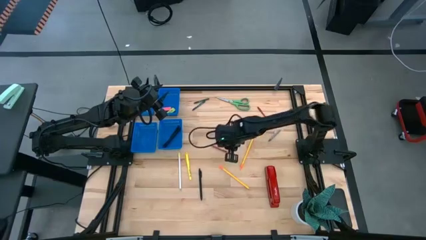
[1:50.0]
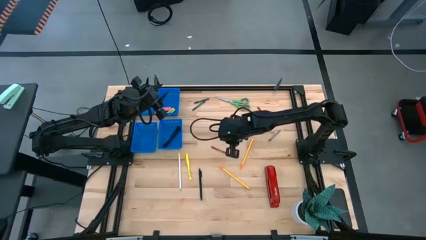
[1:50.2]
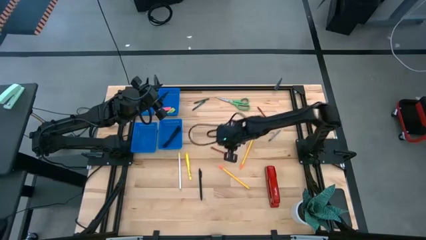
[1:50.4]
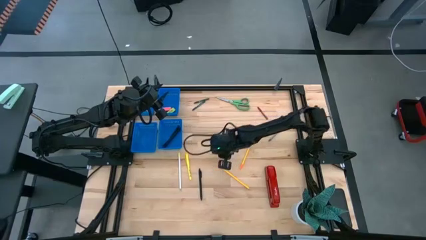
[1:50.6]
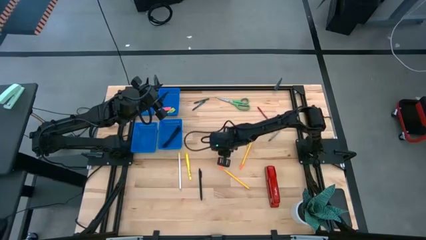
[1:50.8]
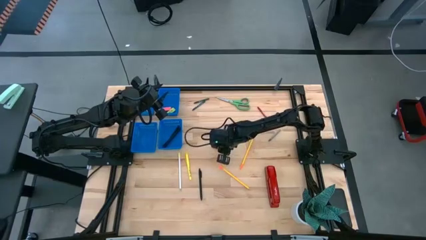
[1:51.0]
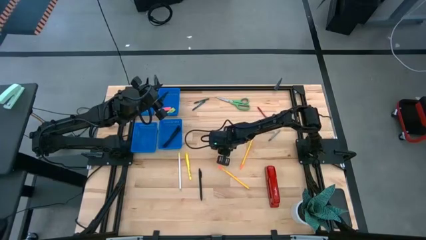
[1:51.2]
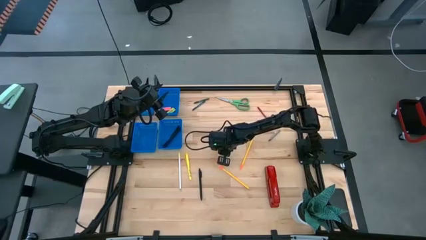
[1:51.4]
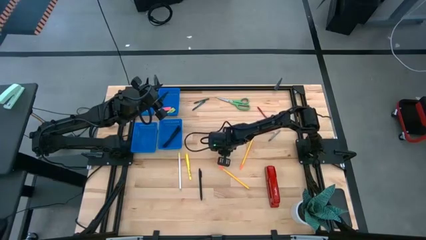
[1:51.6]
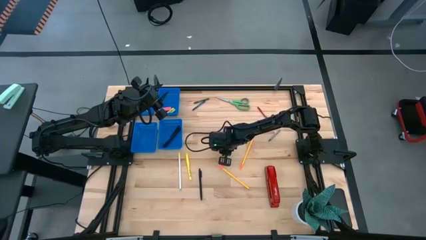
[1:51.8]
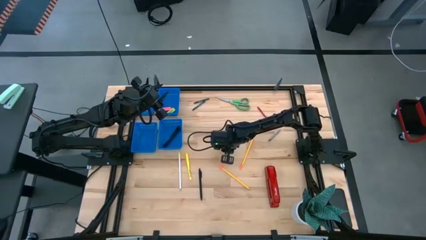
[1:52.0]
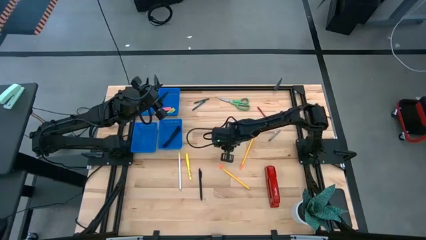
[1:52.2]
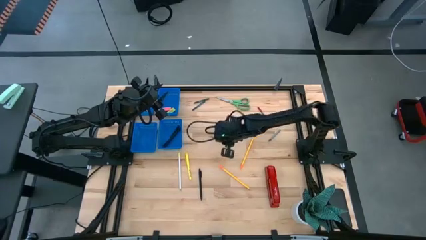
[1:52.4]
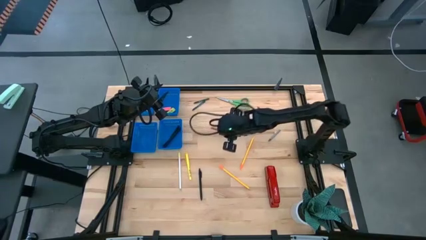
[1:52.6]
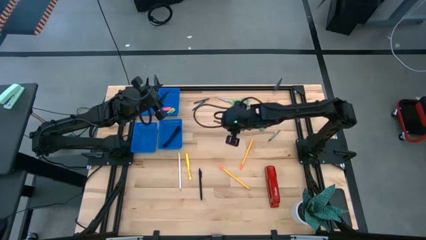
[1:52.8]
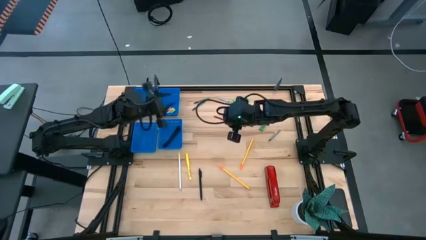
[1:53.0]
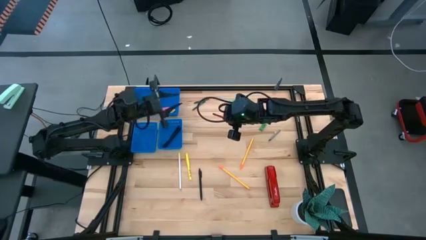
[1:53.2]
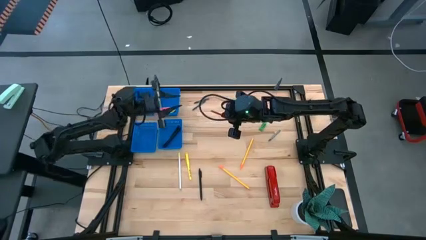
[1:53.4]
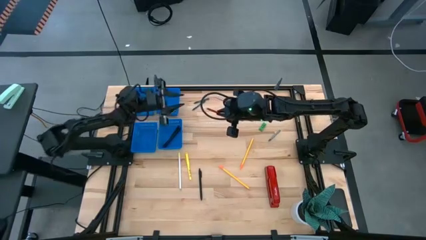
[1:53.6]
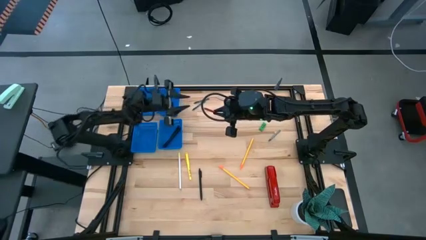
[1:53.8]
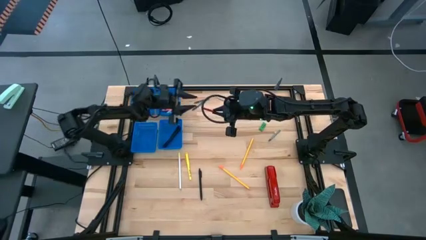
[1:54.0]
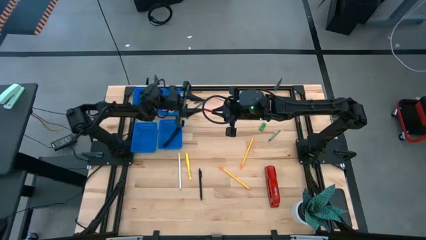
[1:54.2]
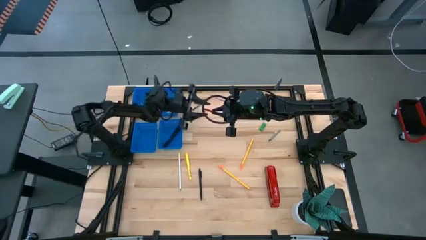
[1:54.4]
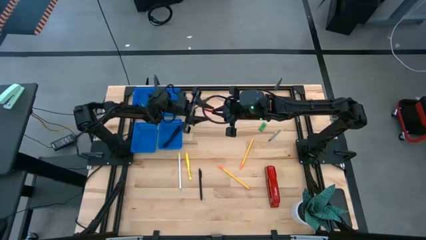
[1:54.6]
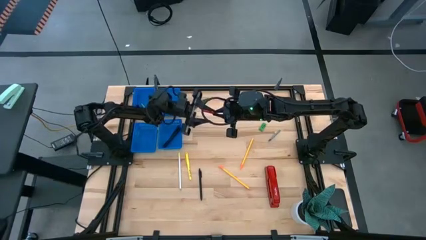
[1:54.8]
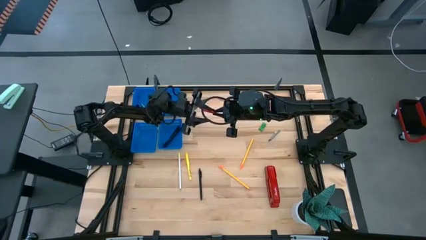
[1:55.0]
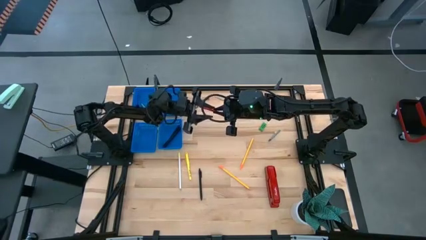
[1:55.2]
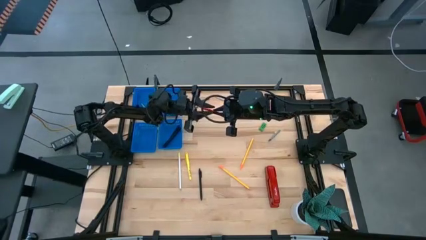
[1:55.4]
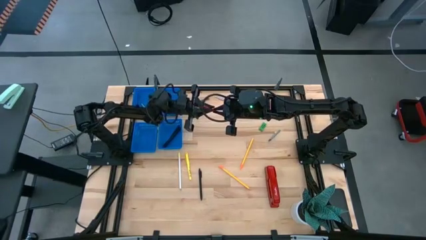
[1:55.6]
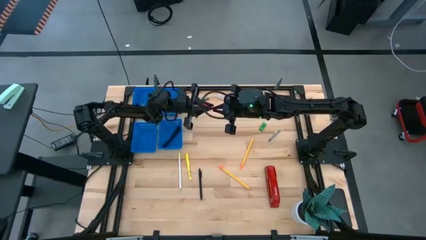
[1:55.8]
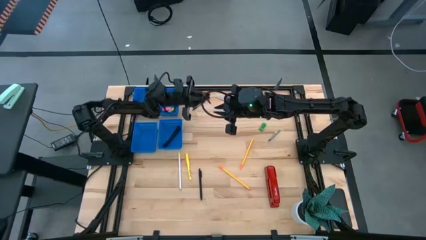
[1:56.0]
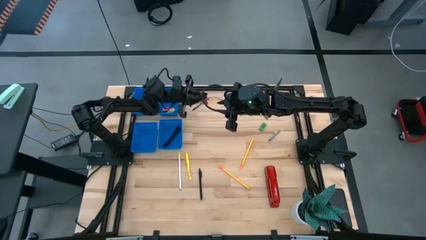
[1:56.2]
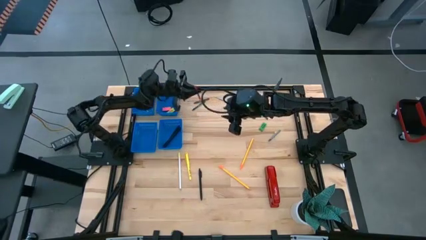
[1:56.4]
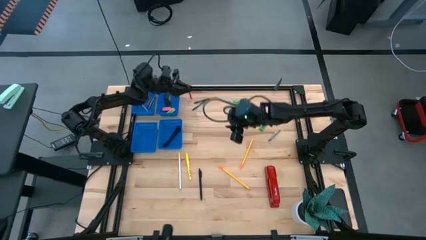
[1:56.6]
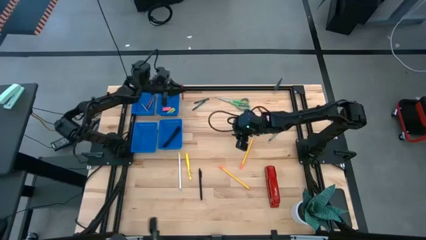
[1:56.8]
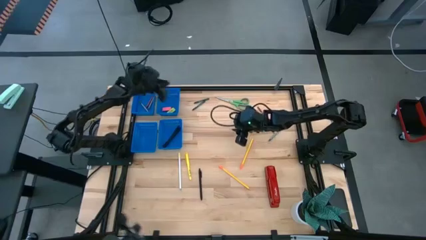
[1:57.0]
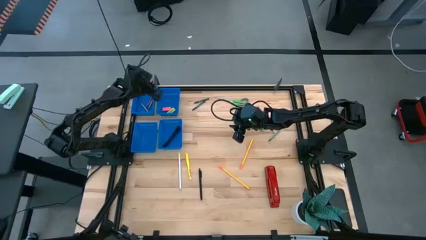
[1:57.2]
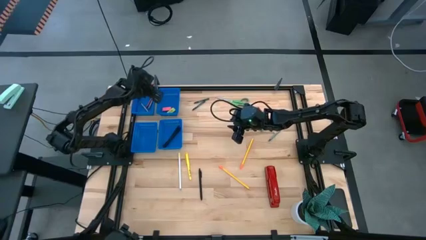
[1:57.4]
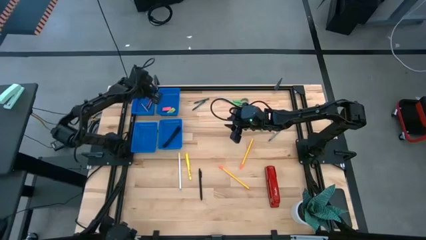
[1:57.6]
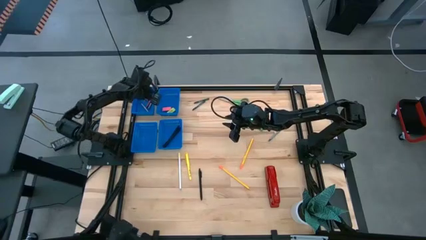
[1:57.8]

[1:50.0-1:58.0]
Task: Sort crayons/erasers/pens/pencils in bins
Put the red crayon into the top left blue bin

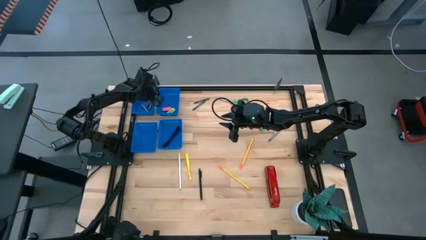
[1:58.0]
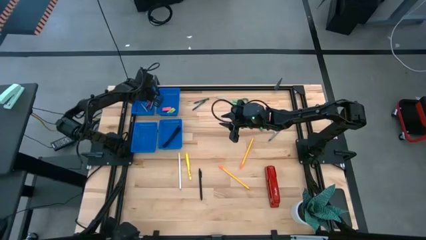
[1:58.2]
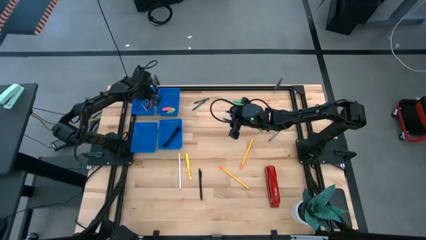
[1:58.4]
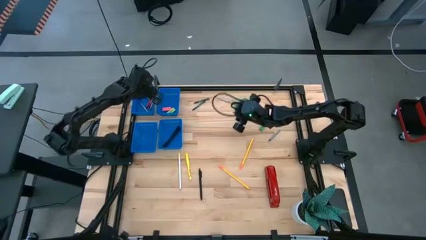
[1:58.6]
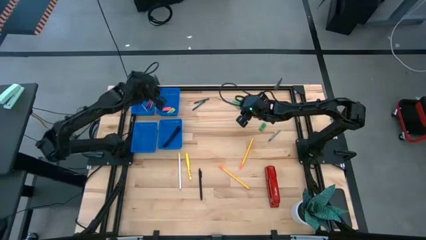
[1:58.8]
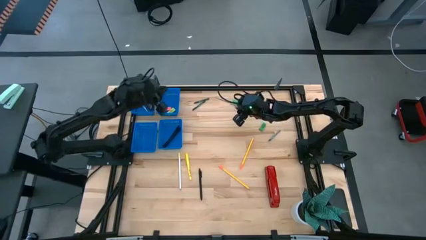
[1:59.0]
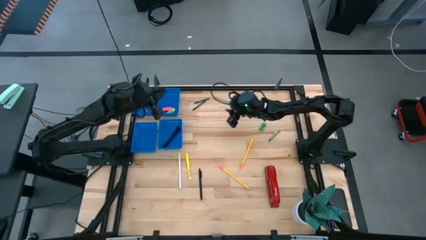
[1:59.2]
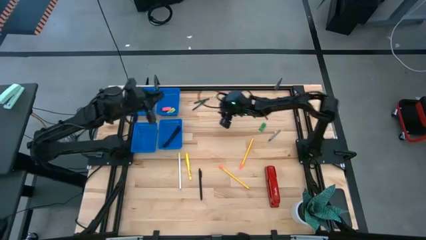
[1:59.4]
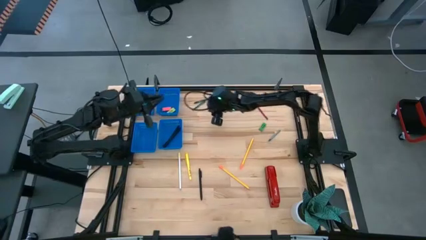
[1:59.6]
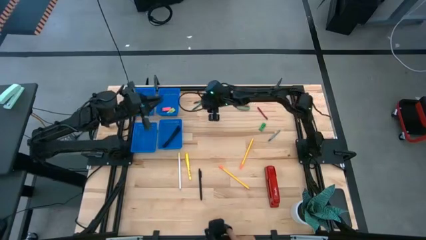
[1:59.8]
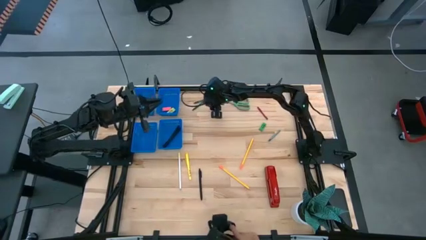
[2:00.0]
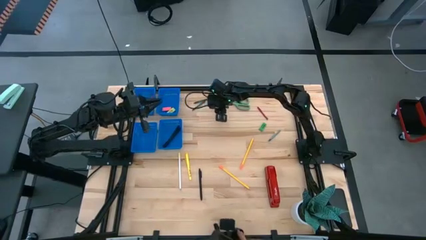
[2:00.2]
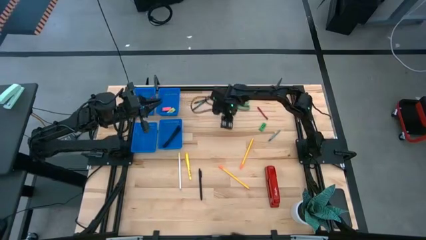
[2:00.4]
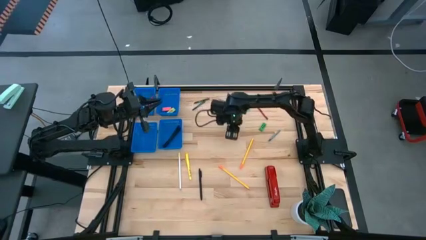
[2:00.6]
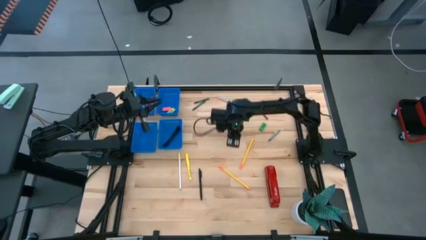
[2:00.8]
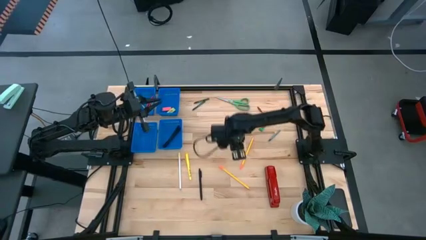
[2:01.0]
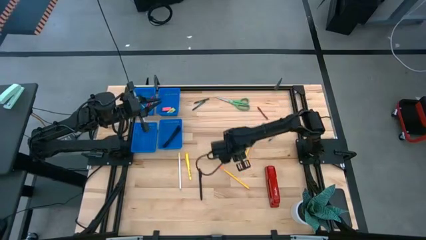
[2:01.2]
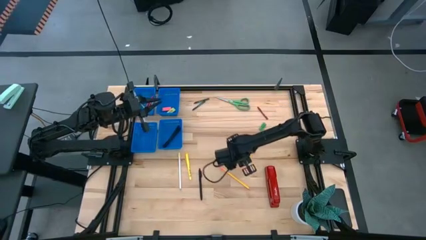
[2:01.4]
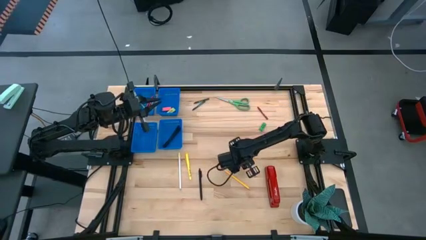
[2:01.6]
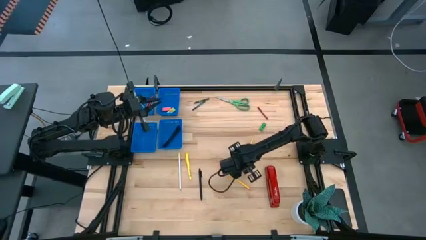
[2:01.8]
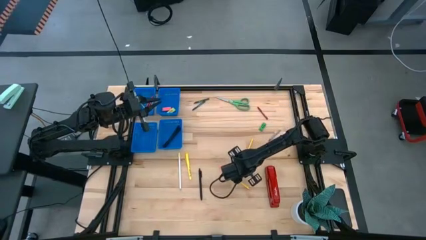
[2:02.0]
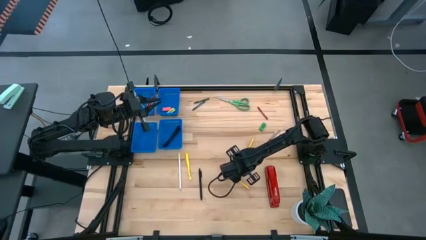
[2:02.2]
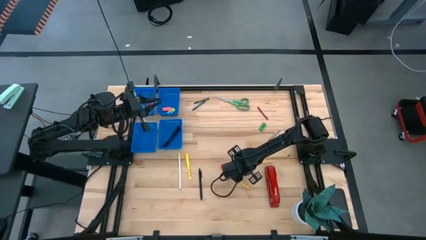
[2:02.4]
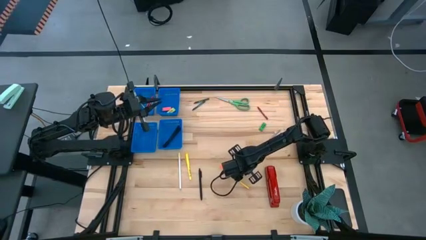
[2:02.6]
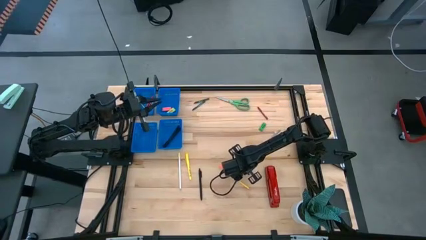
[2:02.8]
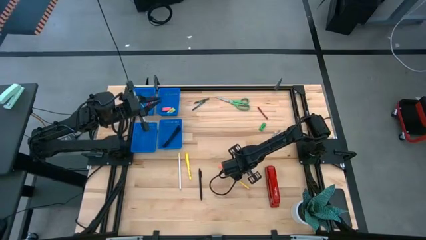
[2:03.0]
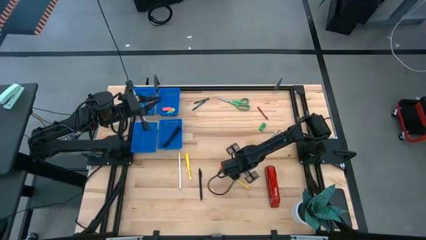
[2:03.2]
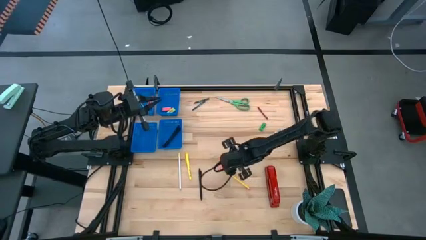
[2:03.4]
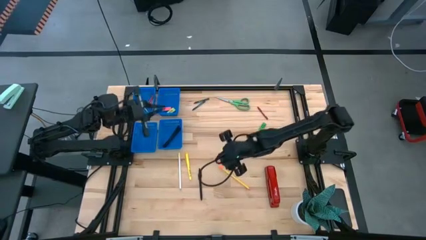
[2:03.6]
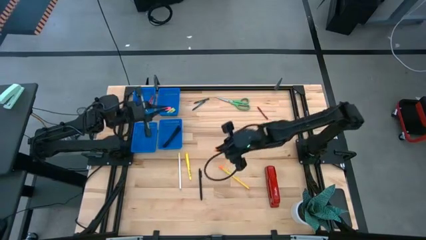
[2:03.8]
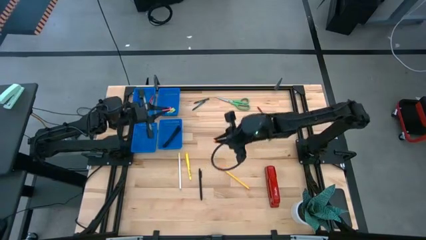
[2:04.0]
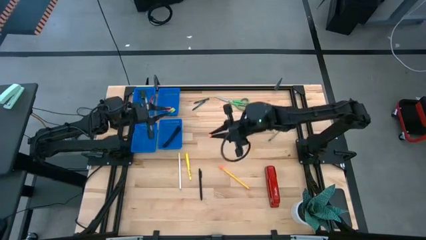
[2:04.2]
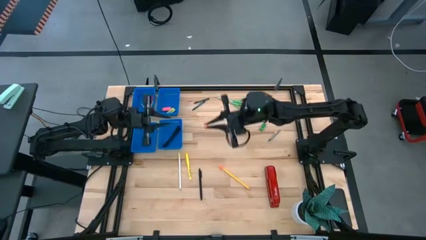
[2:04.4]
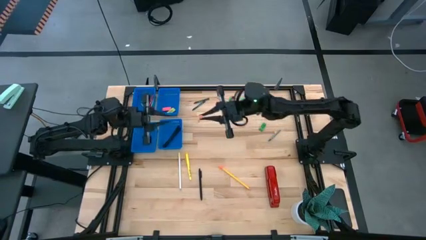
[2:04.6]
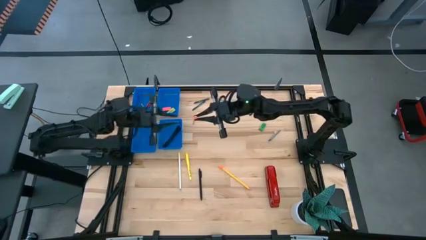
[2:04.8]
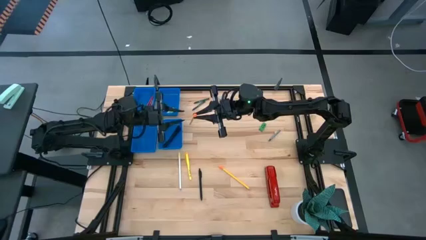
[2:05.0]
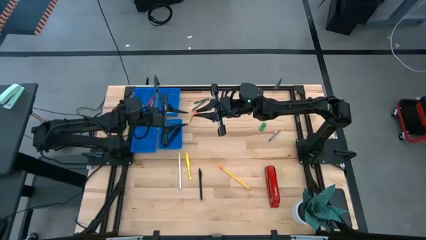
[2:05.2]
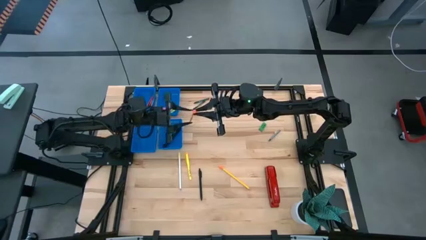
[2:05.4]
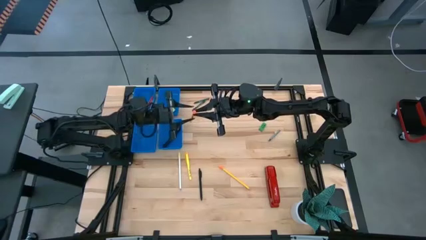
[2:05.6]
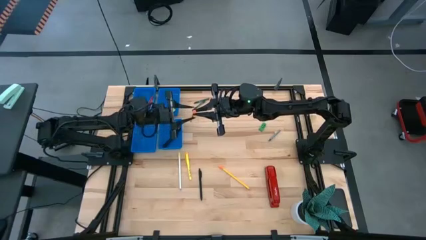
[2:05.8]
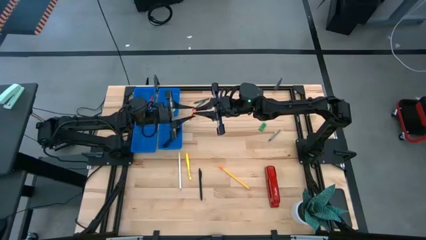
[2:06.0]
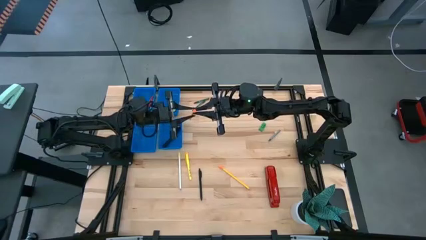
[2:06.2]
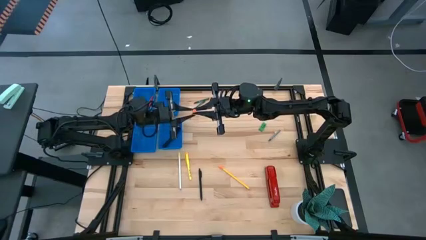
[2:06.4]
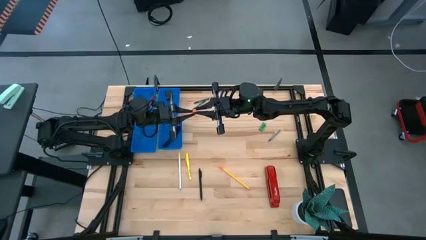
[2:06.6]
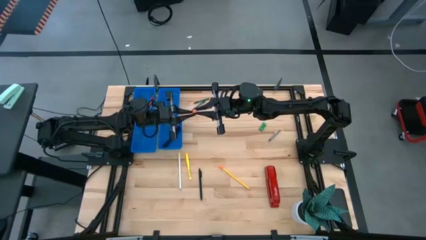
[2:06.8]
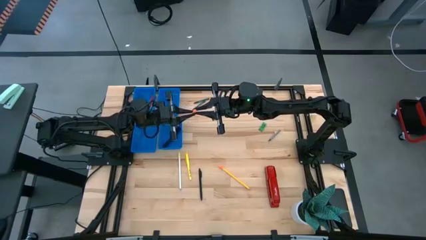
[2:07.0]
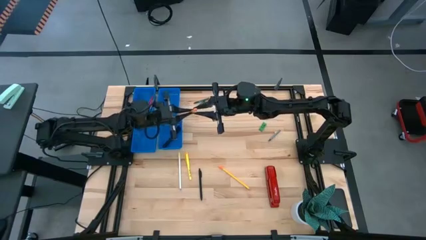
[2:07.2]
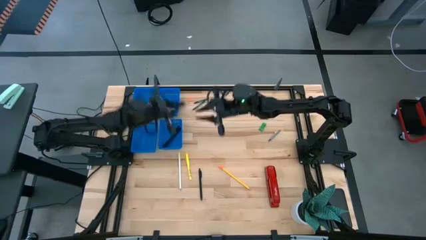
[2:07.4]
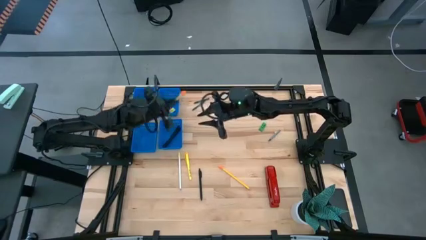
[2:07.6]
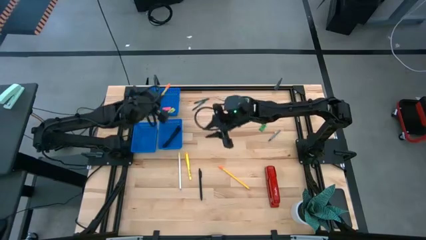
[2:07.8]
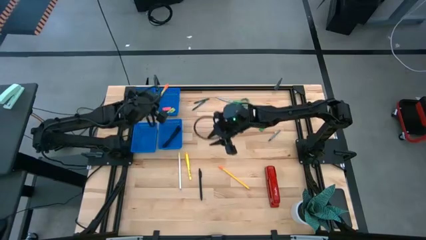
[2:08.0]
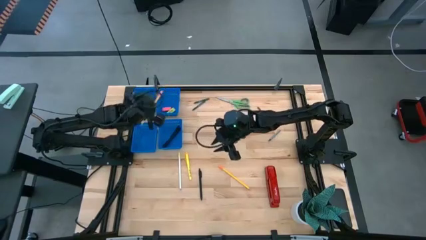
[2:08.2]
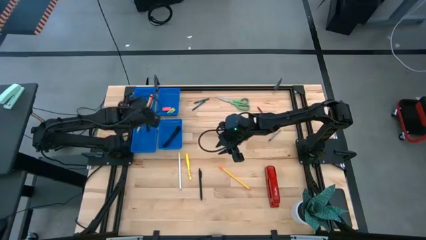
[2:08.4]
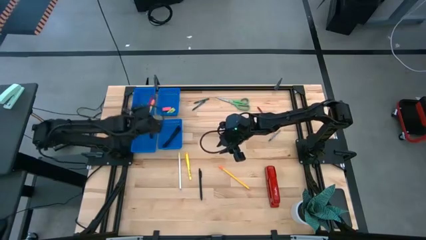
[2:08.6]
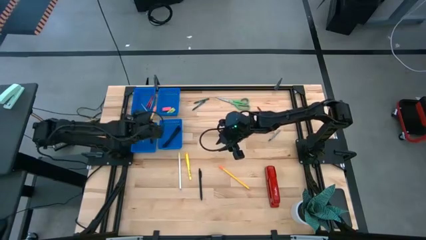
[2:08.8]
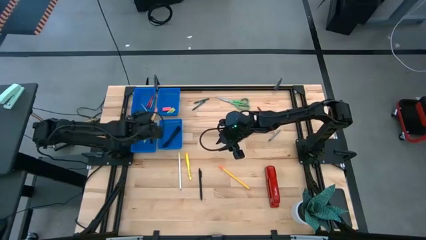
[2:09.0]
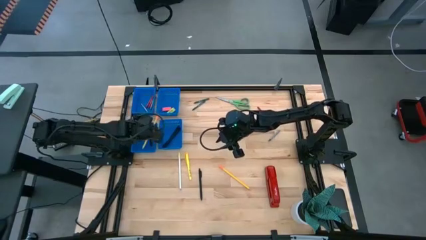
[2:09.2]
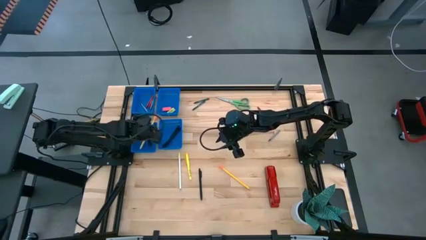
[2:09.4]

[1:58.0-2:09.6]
Put the right yellow pencil into the bottom left blue bin
